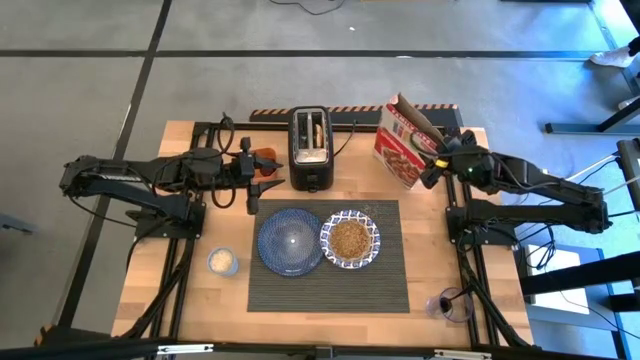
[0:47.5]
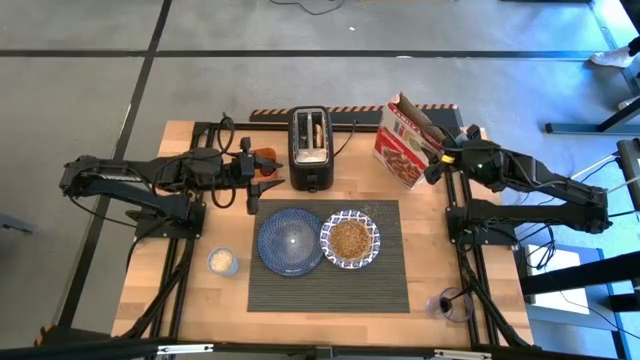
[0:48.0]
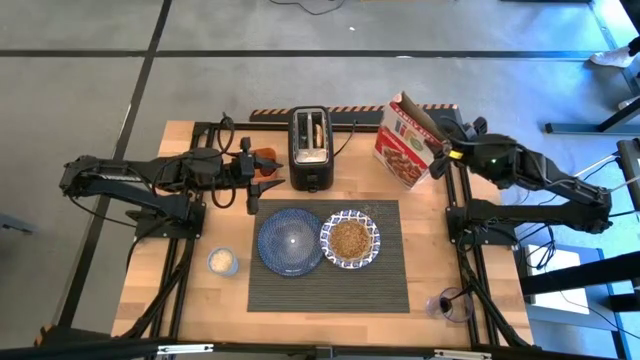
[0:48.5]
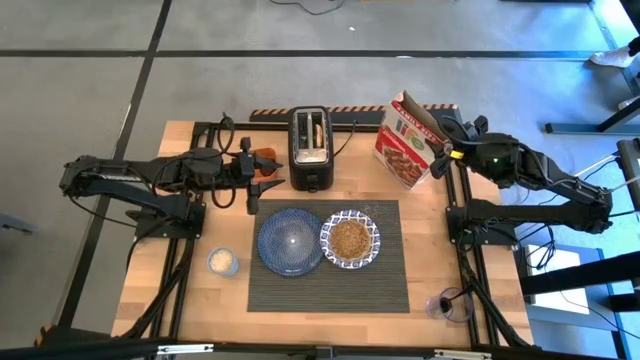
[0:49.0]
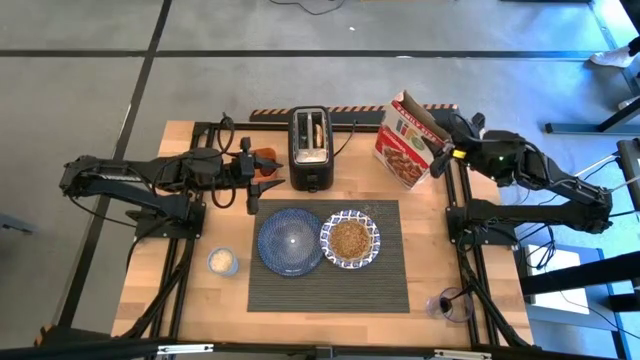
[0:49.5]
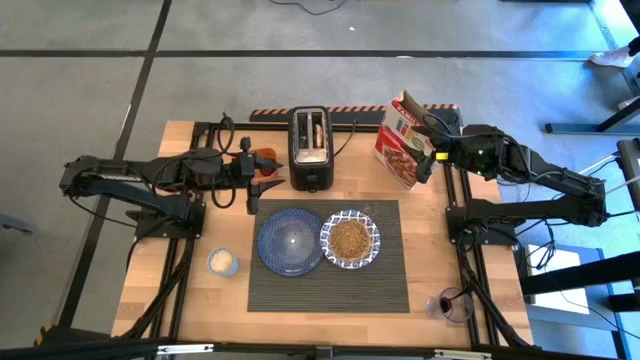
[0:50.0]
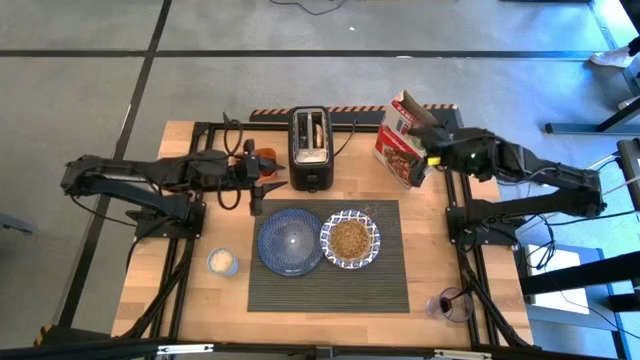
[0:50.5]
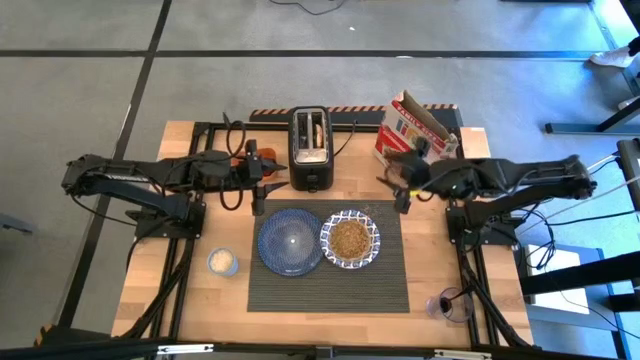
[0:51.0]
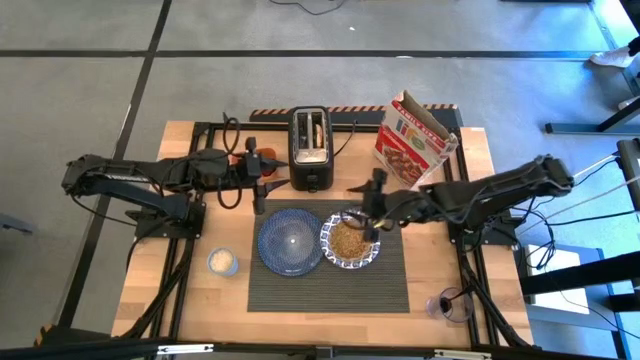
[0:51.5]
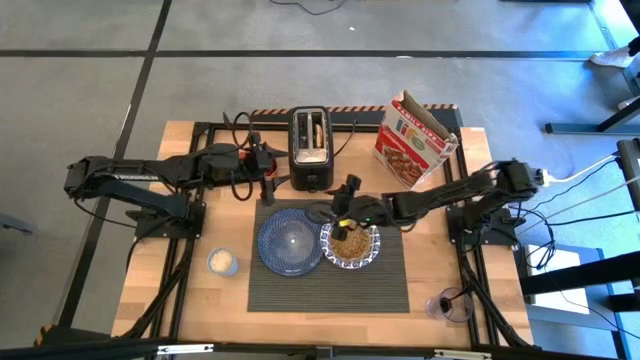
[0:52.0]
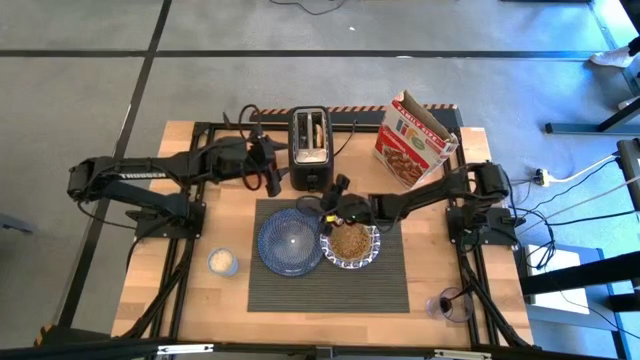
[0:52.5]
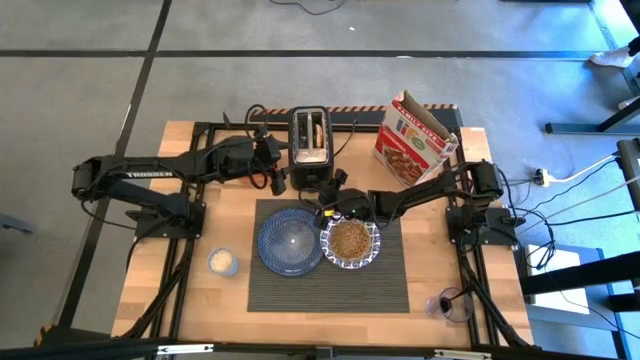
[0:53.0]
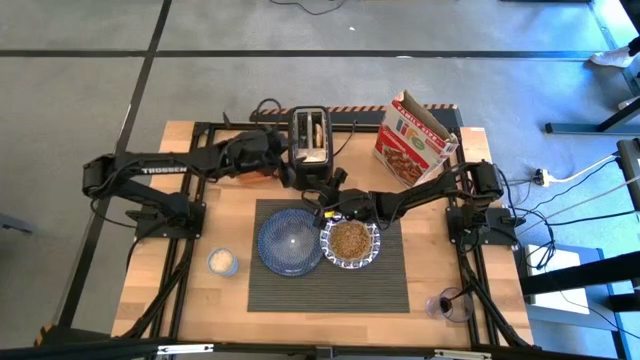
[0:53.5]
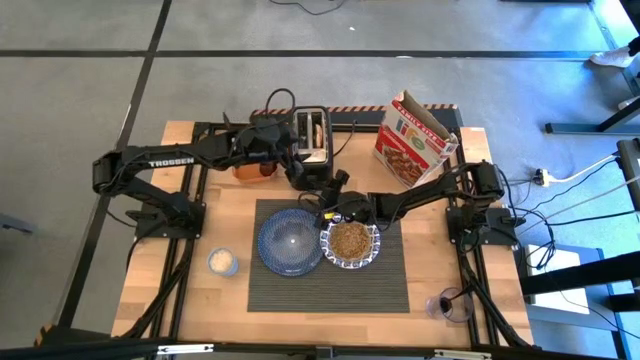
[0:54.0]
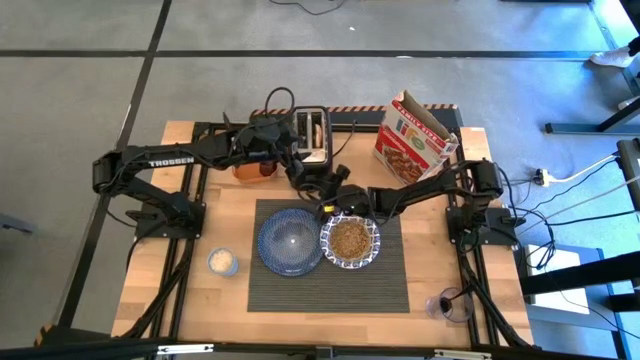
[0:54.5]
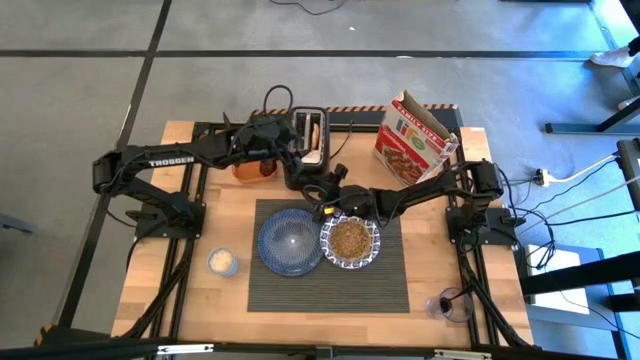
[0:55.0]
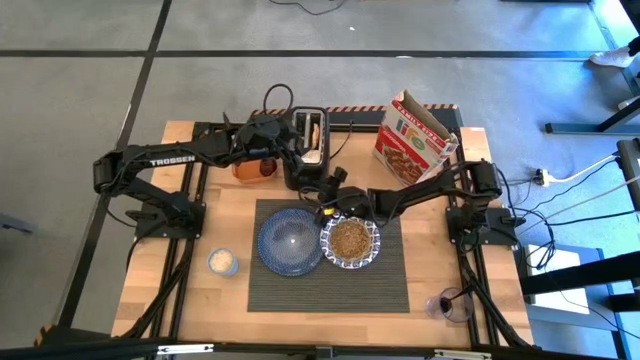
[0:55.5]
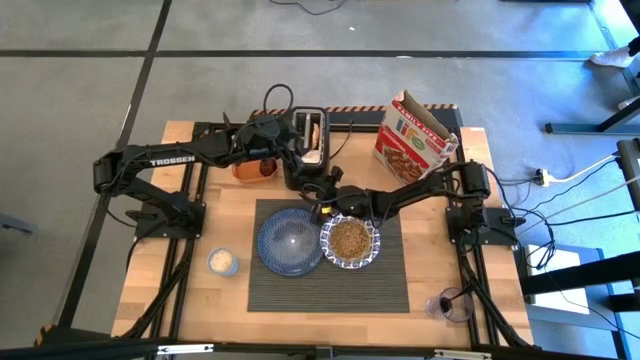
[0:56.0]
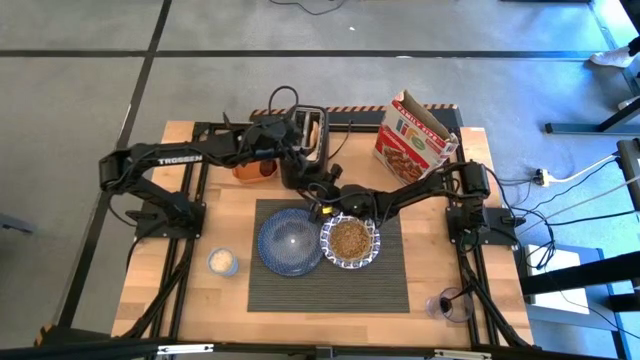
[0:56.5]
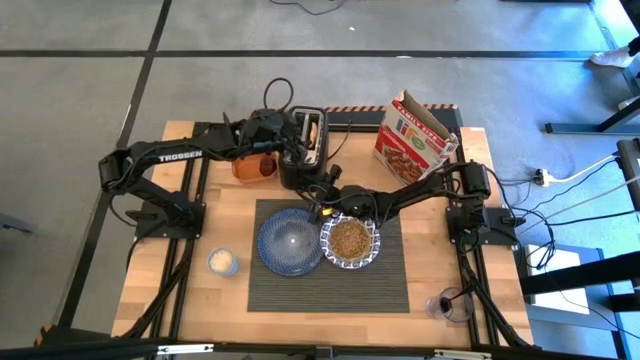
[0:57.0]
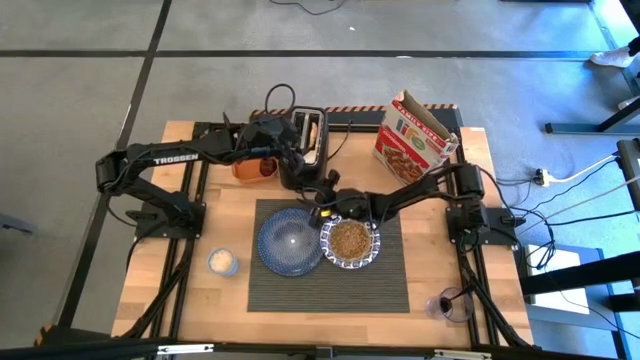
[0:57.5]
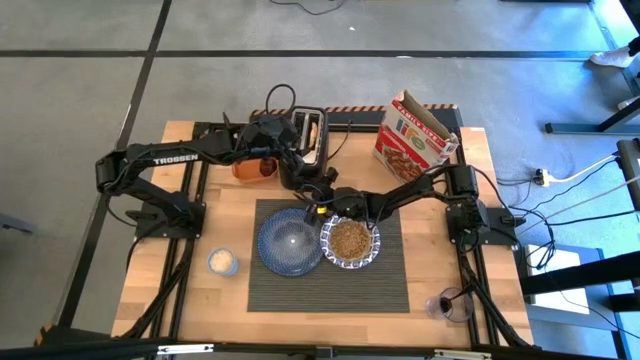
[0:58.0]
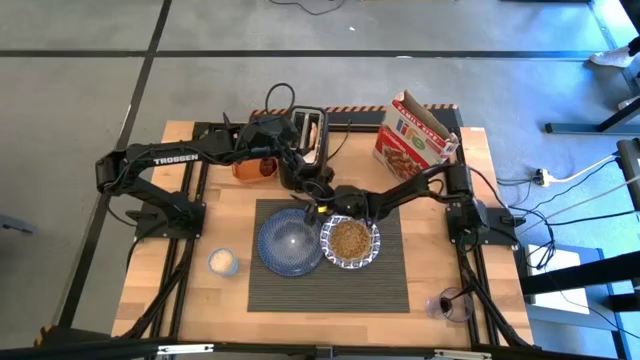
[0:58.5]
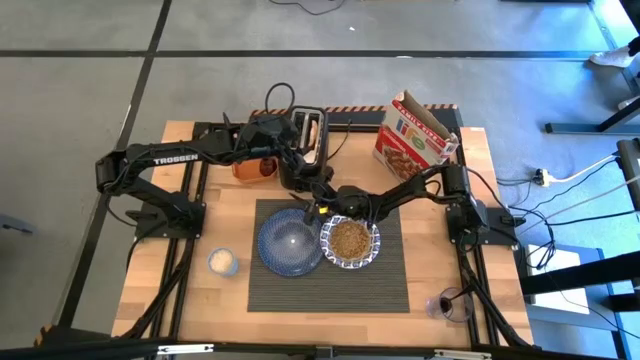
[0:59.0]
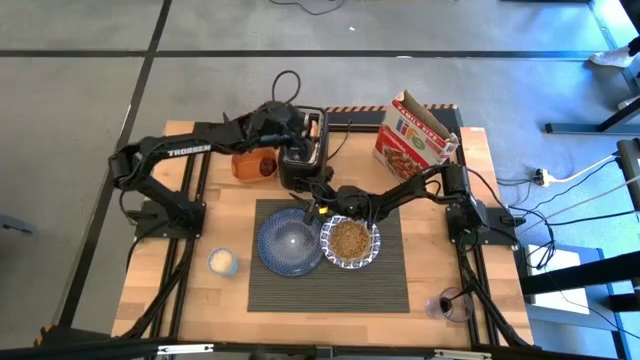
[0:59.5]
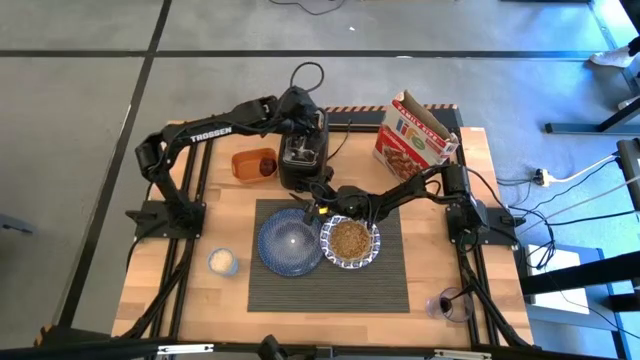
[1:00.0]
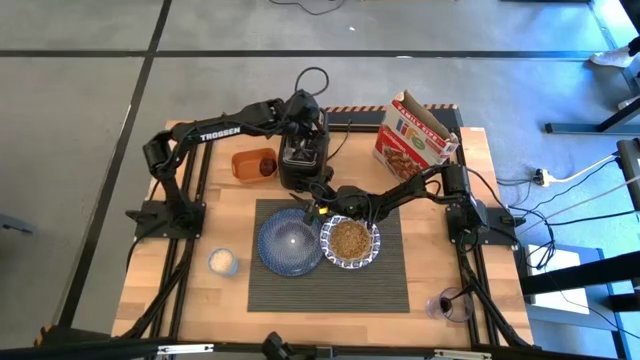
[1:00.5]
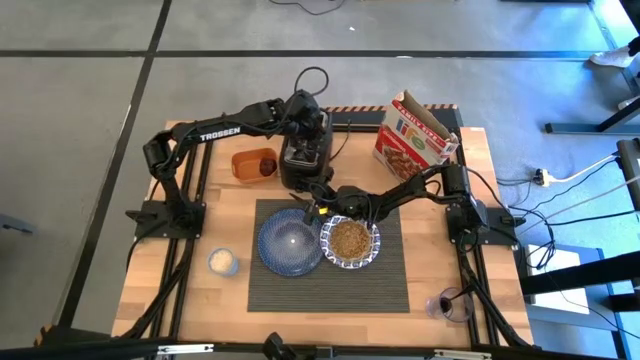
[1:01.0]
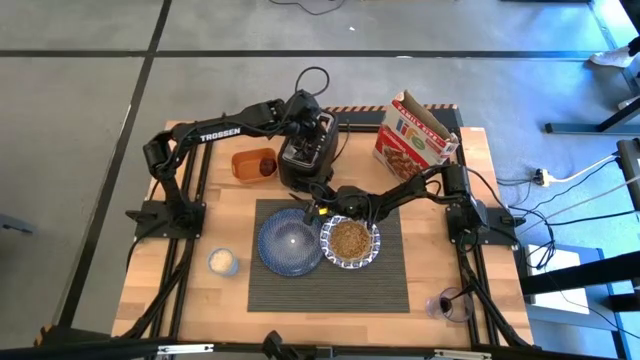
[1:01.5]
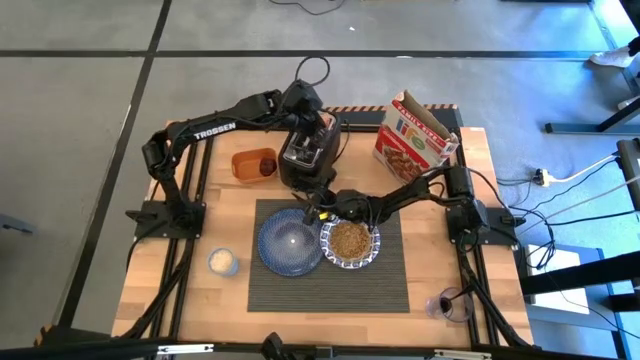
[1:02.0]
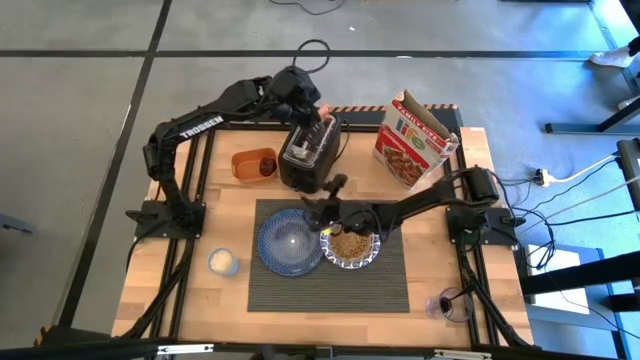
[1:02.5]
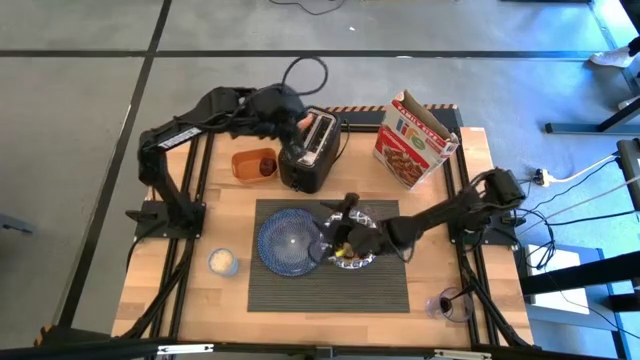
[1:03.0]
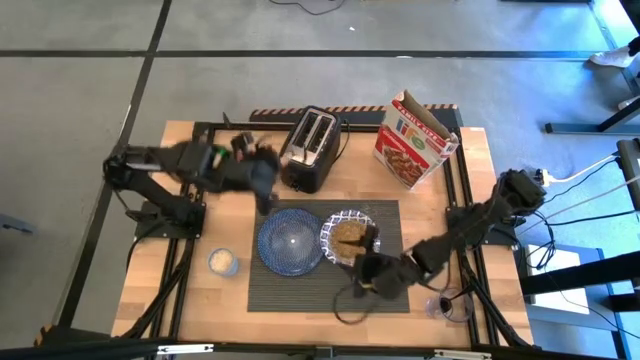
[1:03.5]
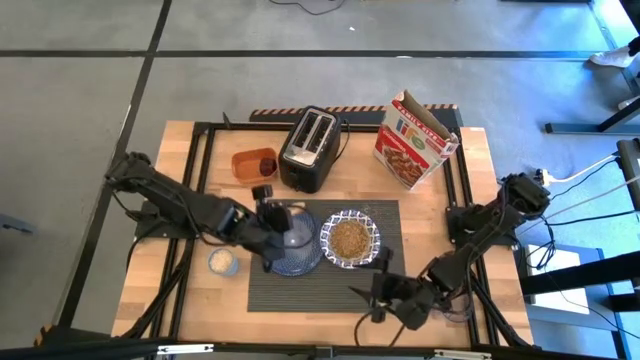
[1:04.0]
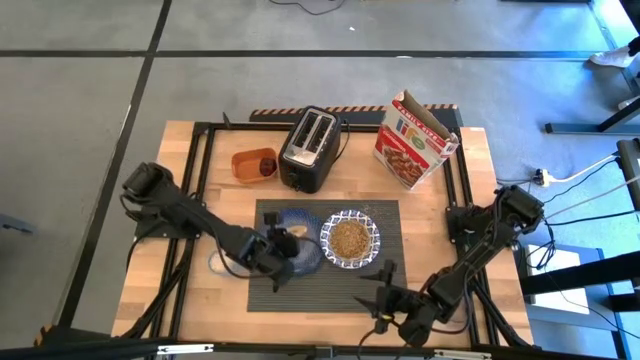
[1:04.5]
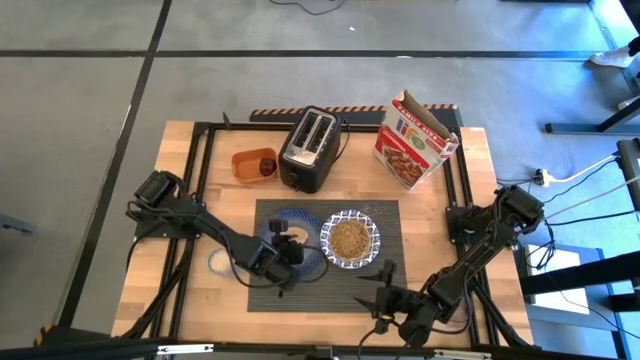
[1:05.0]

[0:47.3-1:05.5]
Task: Arrange a breakfast setting
Put the toasted bagel on the blue plate from the toaster

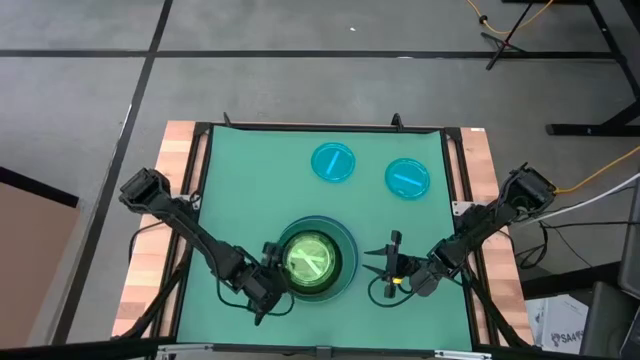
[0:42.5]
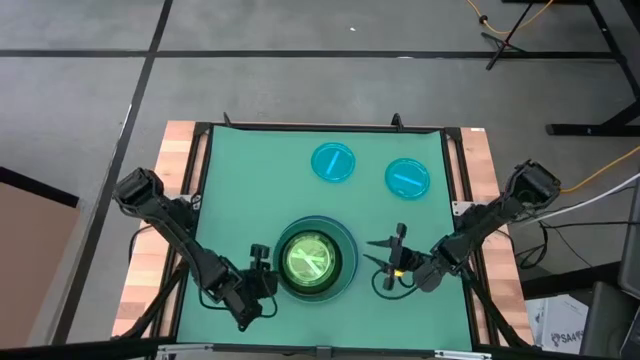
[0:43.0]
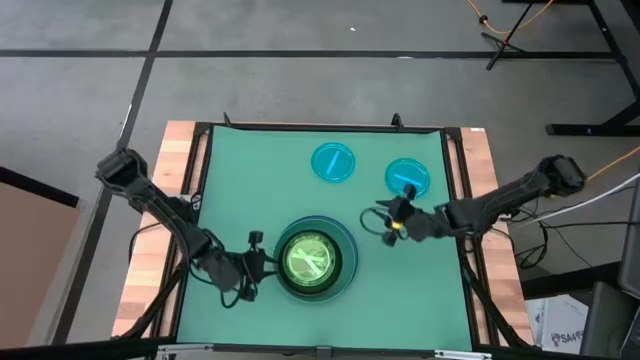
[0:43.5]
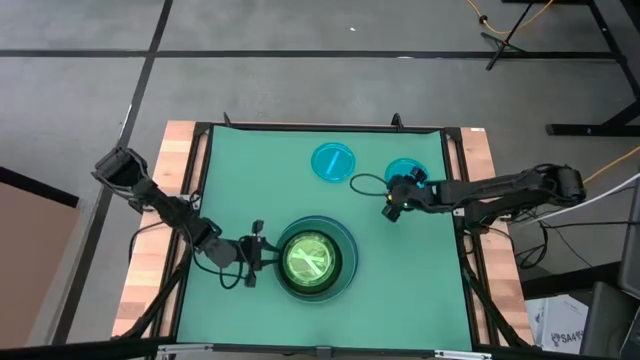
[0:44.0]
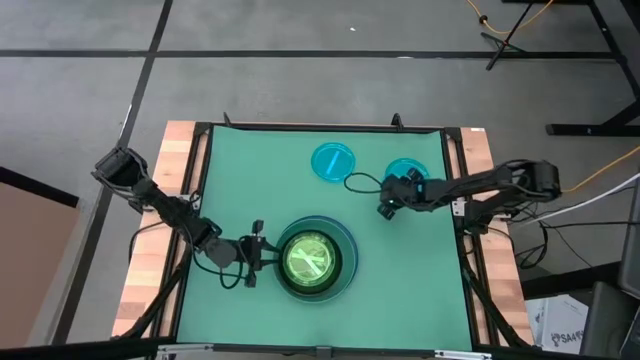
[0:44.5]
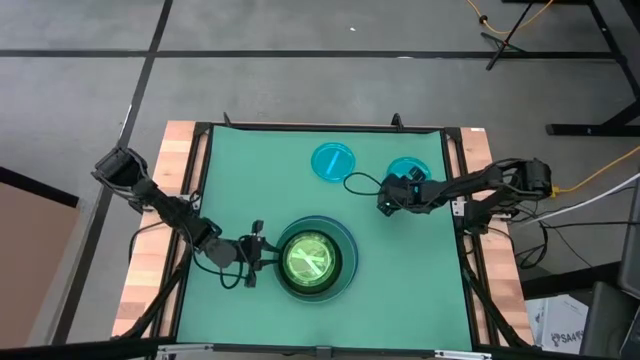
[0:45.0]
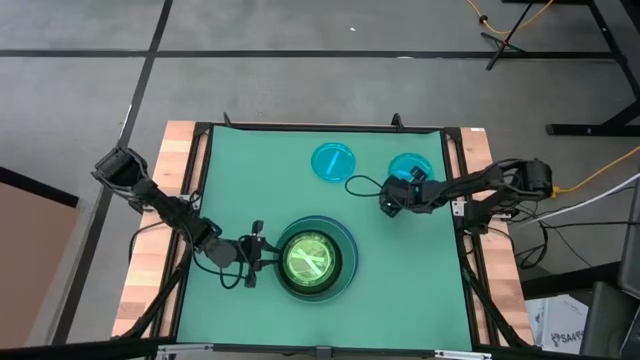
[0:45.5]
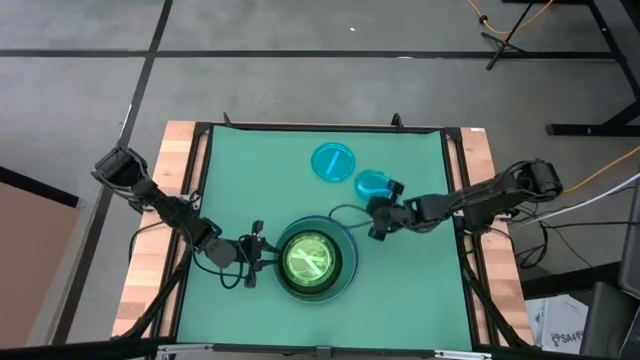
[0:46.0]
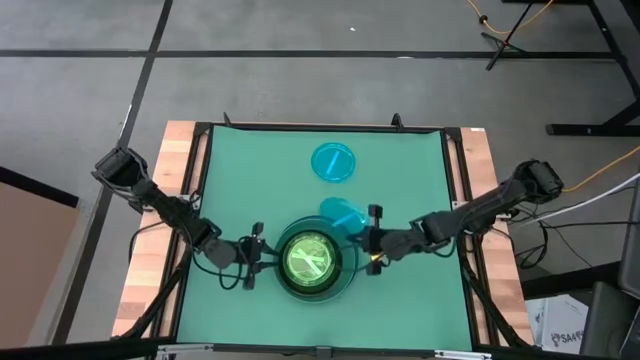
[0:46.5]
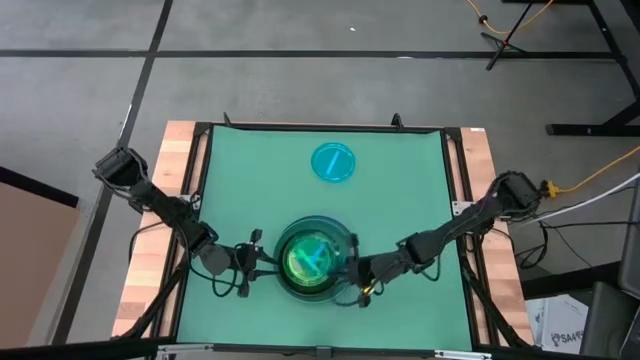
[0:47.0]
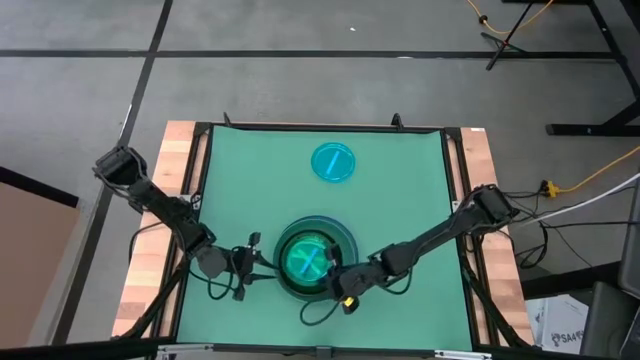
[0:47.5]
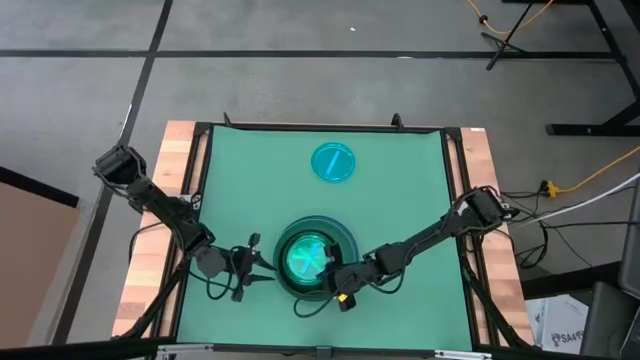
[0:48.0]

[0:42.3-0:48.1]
Task: Stack plastic plates
Stack the right blue plate on the green plate
